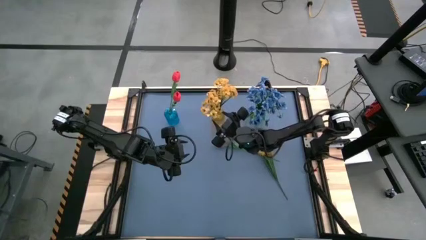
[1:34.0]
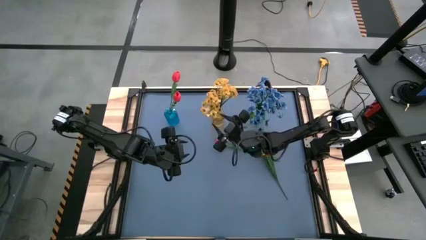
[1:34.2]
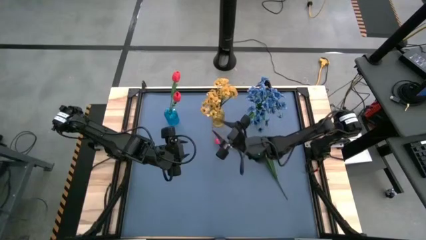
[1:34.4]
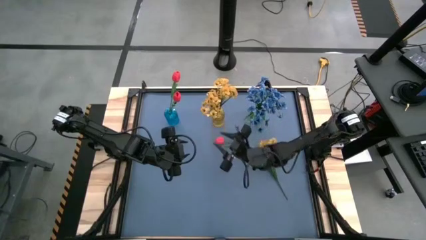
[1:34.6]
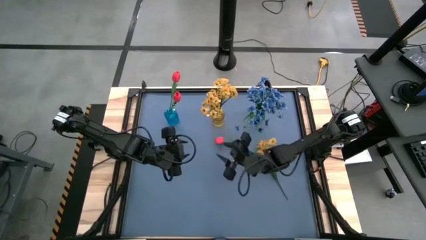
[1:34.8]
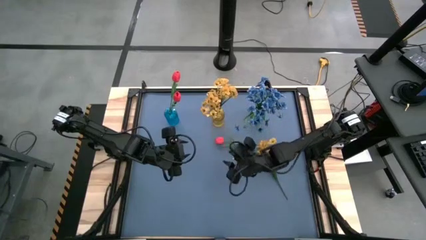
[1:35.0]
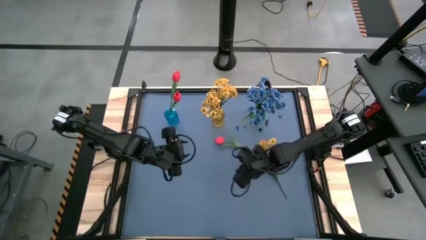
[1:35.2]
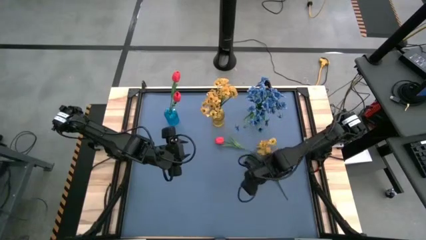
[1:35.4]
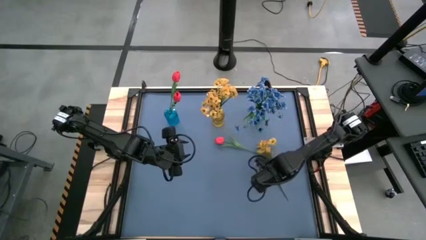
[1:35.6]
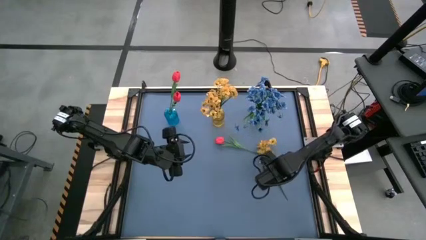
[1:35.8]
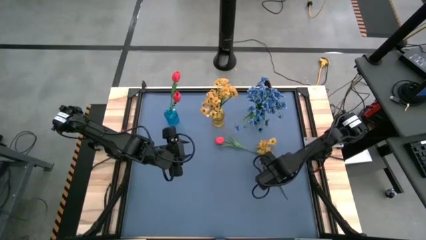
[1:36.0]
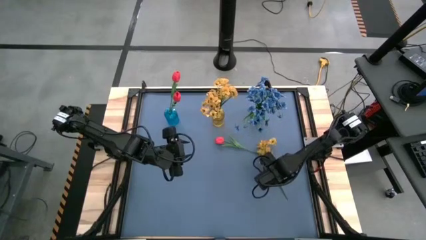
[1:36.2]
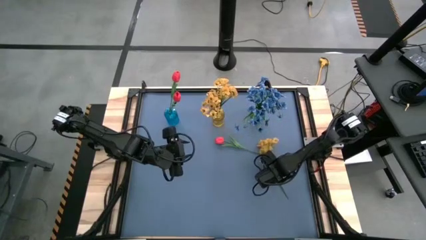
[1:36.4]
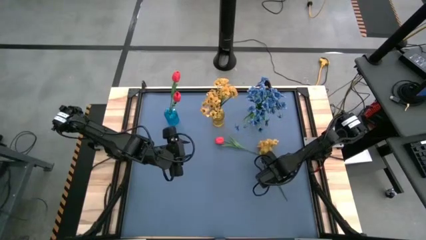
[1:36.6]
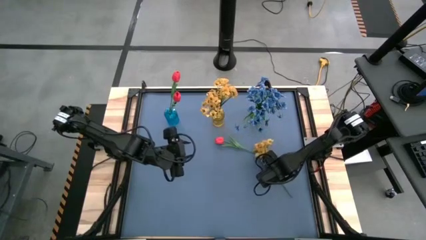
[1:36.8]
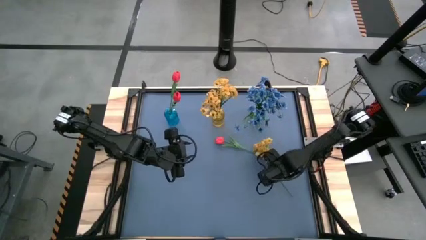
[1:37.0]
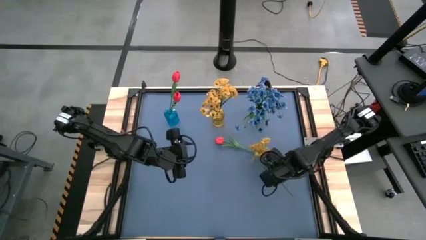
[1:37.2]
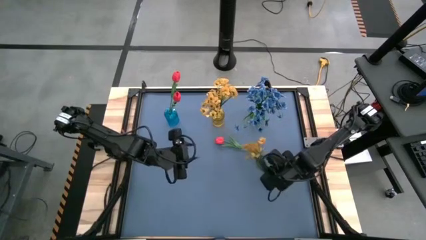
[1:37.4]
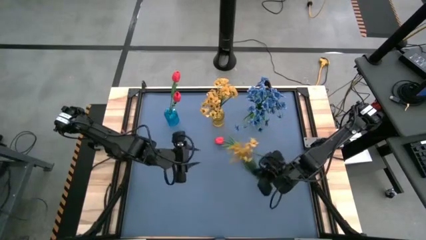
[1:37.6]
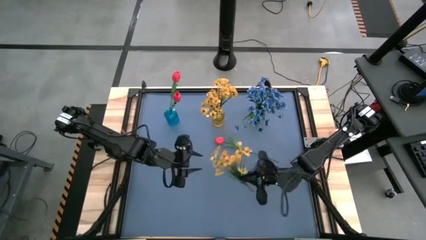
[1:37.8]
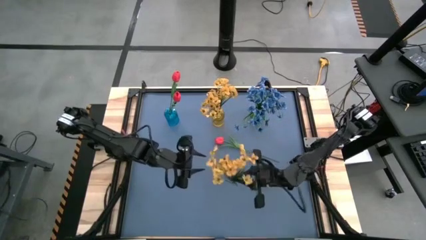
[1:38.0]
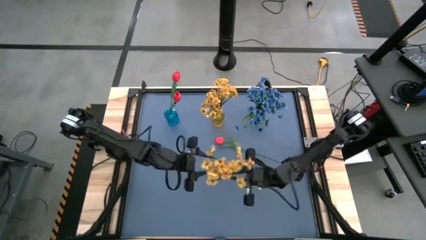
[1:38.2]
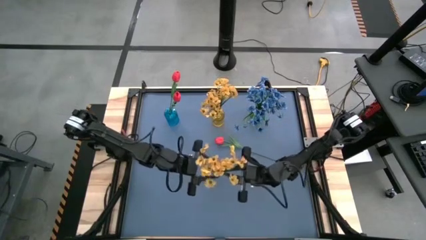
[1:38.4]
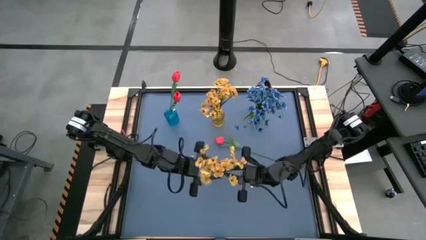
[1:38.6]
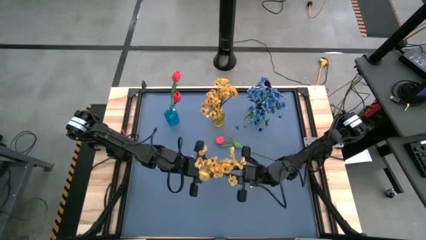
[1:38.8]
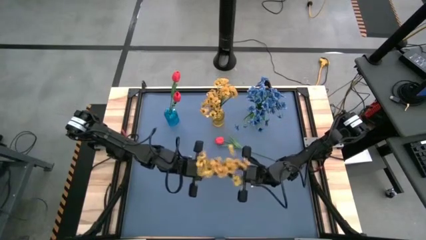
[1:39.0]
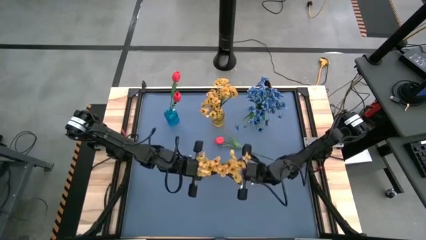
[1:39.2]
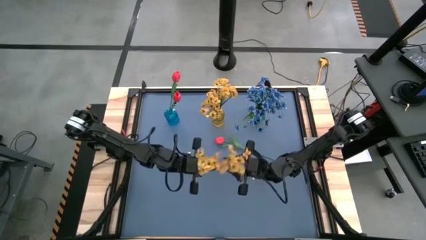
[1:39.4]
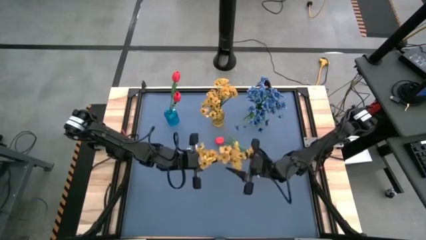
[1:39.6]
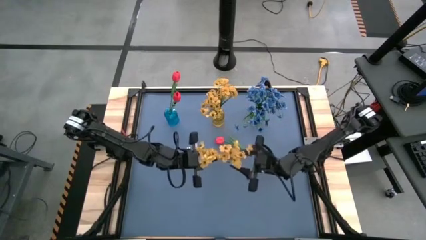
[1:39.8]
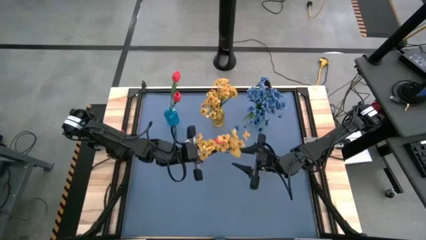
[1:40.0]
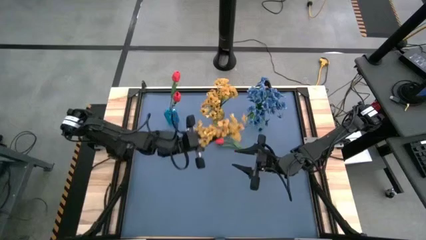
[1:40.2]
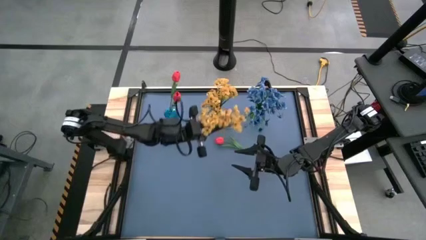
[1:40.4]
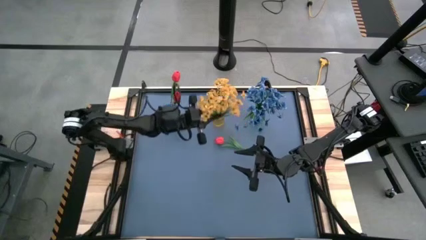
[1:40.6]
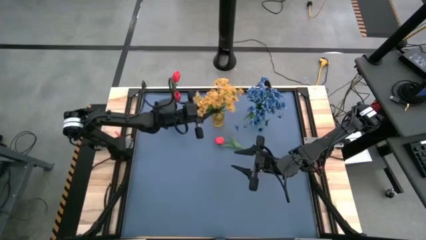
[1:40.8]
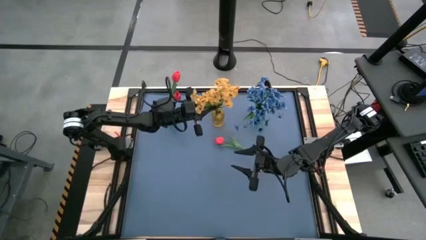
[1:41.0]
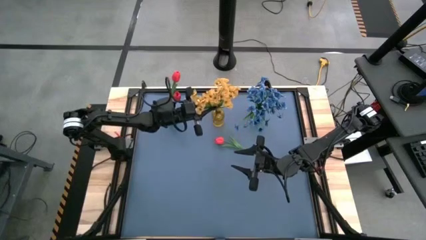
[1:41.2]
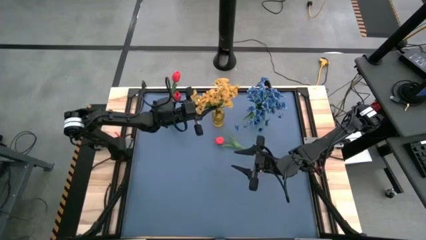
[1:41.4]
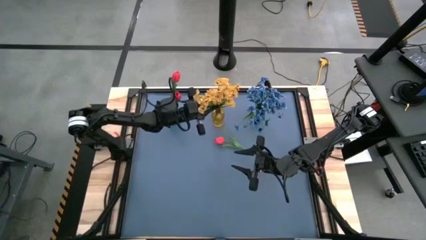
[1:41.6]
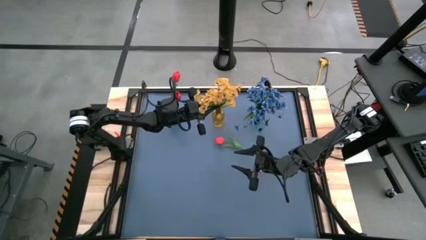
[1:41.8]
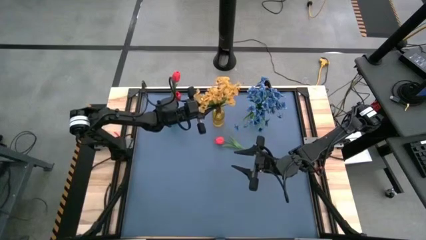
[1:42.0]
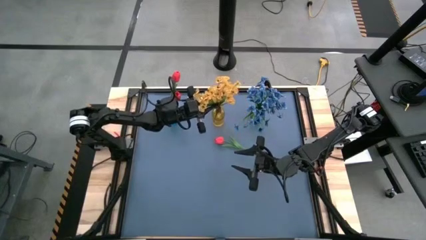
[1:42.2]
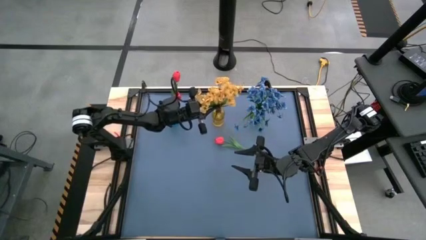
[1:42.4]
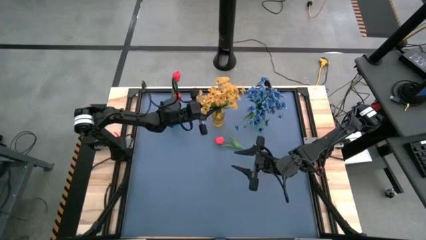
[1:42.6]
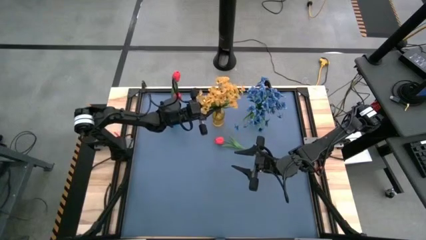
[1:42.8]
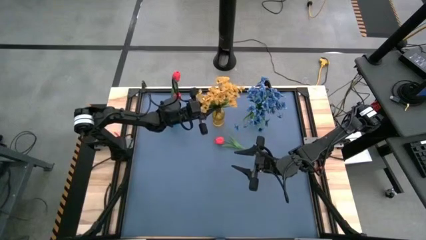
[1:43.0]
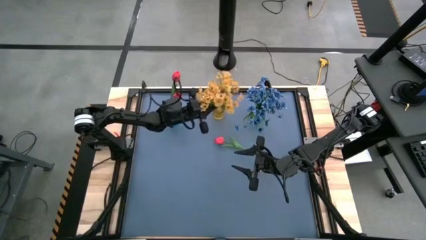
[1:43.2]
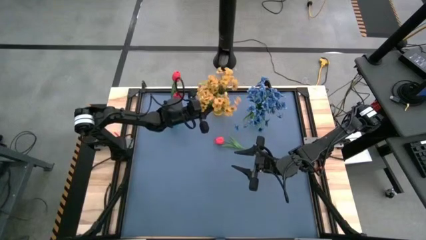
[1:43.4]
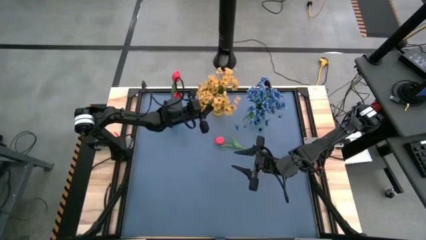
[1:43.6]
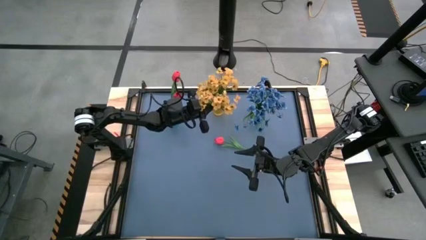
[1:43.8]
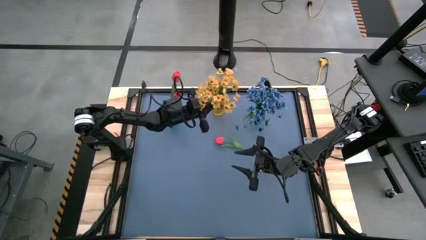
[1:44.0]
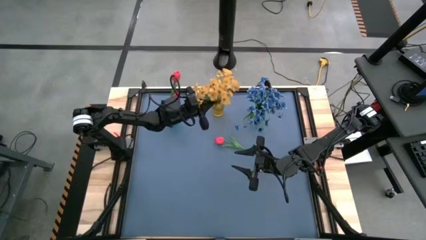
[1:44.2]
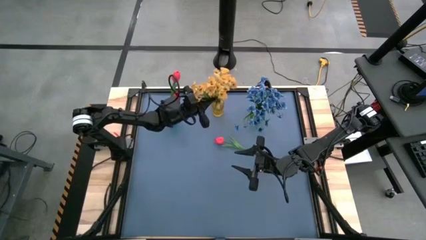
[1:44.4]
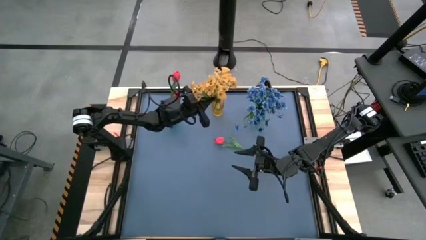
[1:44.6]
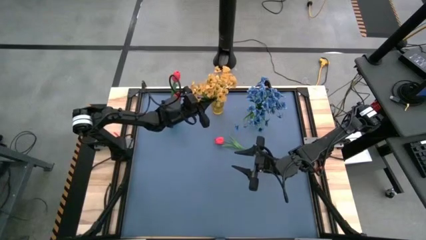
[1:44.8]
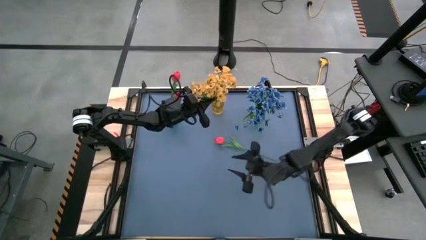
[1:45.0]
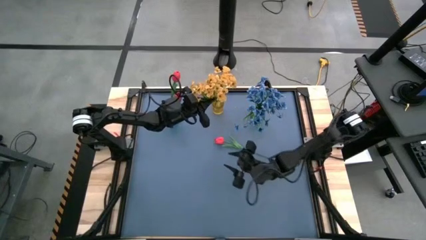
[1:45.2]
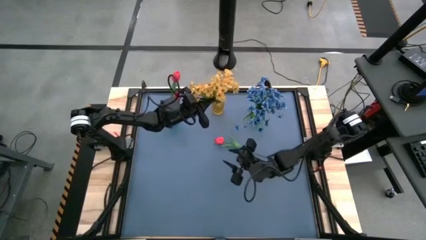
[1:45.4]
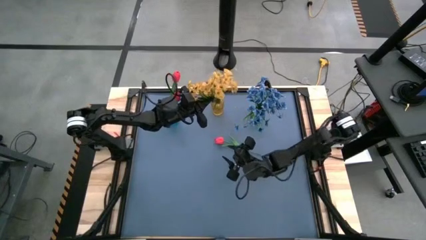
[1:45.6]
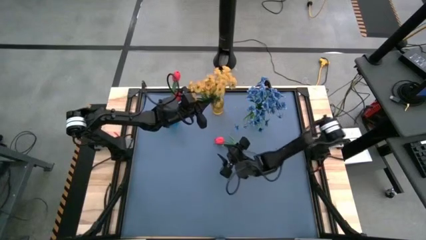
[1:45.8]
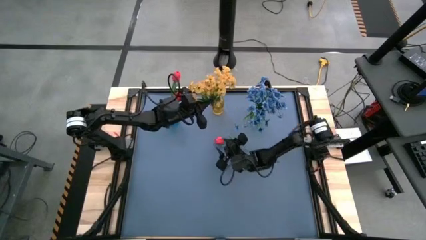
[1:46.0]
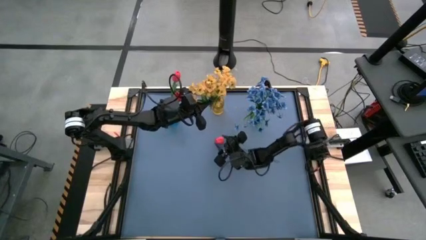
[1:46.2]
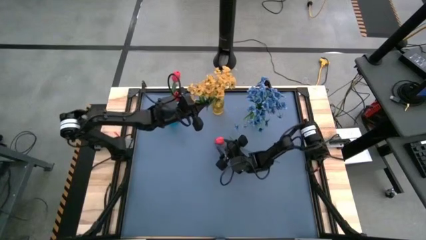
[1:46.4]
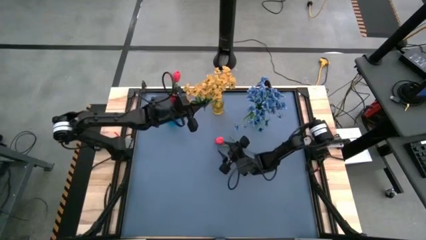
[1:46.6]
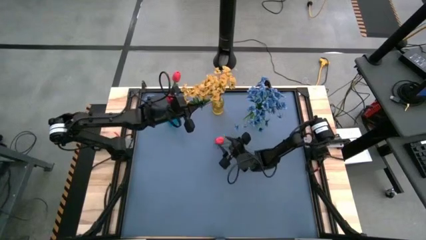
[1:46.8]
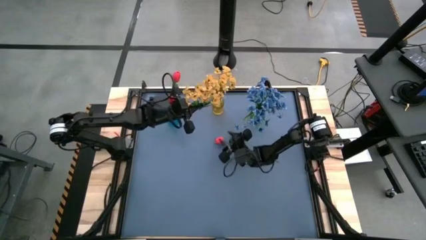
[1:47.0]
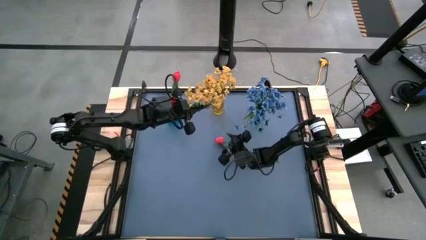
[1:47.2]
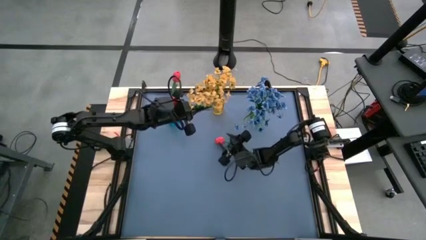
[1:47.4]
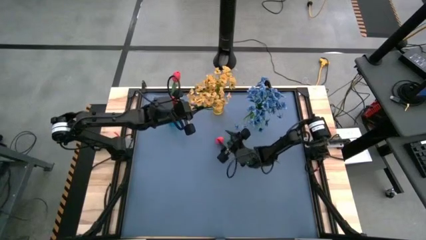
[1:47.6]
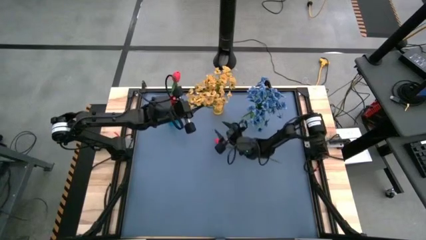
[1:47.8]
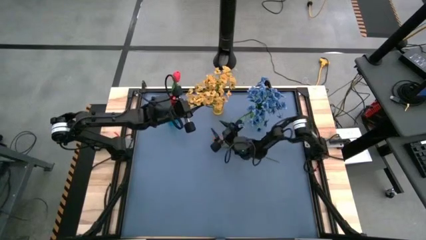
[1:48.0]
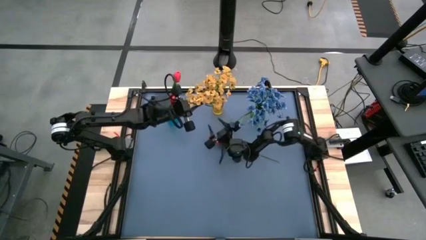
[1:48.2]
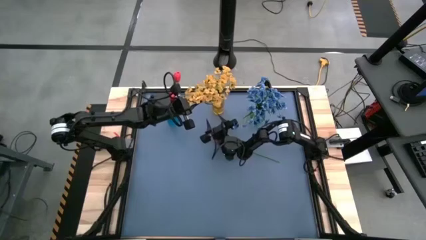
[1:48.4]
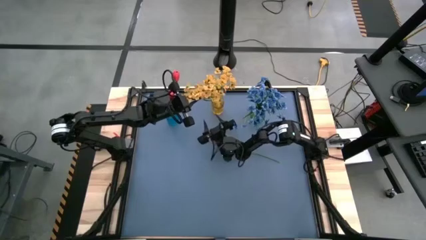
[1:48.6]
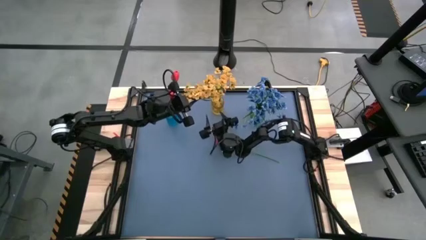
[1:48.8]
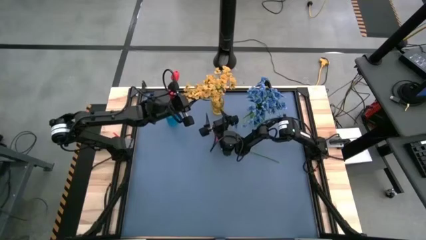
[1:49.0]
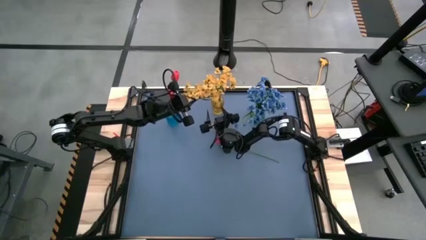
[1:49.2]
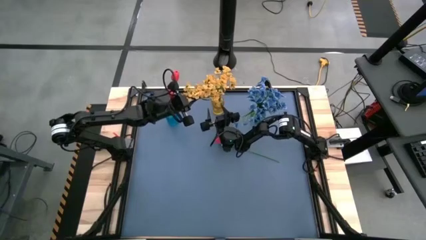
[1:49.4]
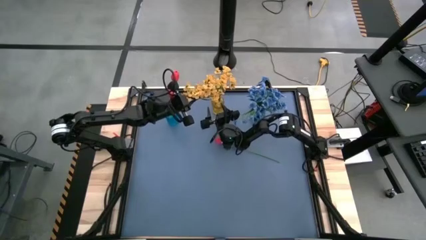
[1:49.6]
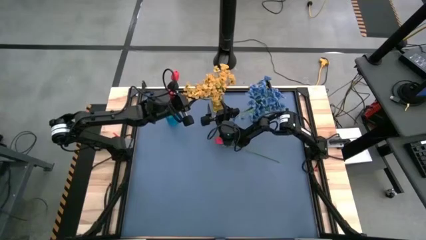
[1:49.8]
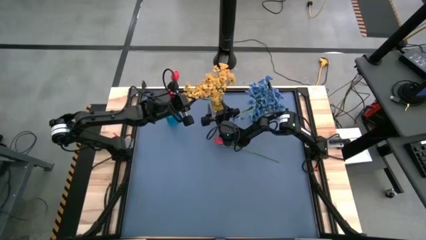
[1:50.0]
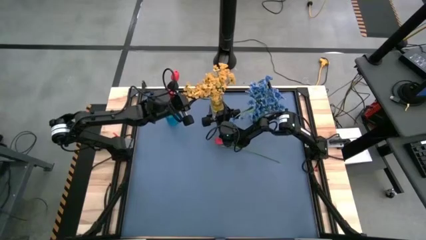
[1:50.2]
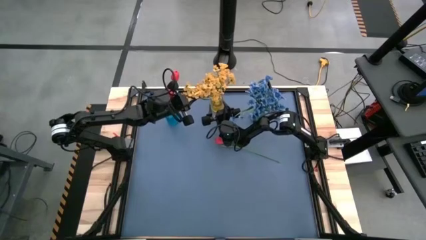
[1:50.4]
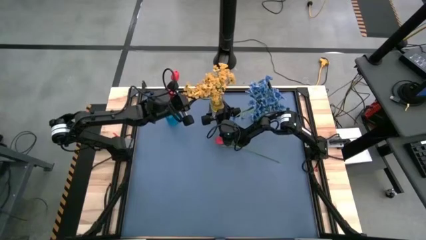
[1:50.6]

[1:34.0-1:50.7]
Task: Sort flowers into vase by color
Put the yellow flowers into the yellow vase
